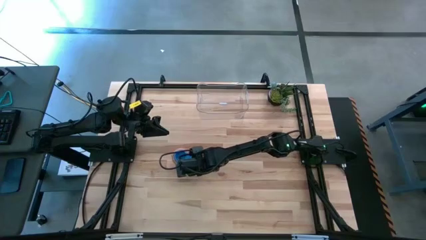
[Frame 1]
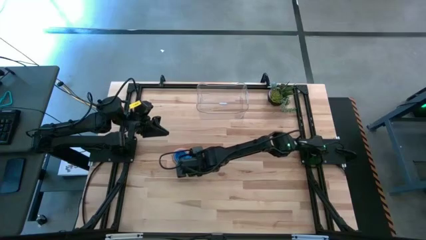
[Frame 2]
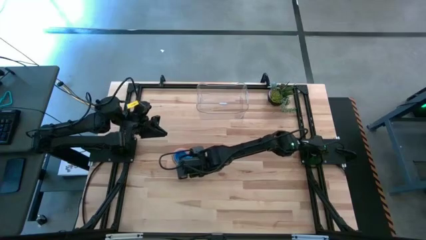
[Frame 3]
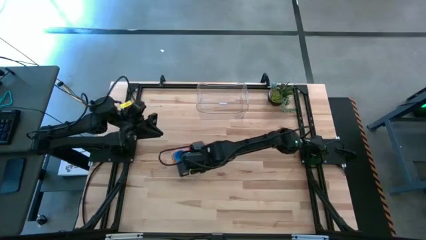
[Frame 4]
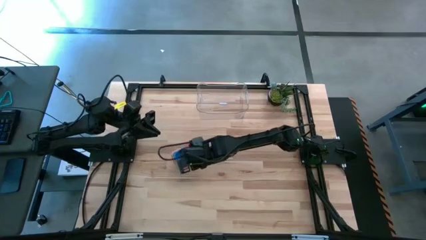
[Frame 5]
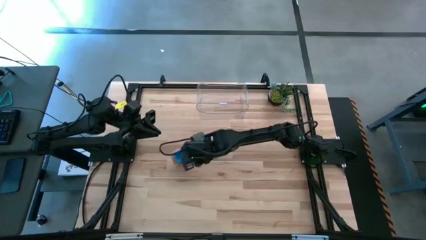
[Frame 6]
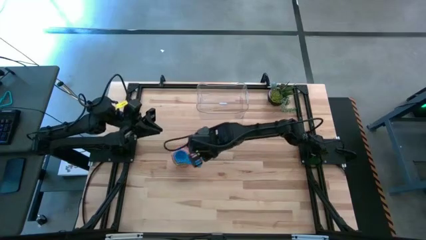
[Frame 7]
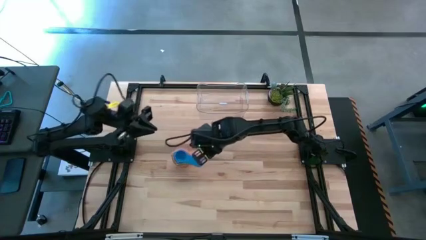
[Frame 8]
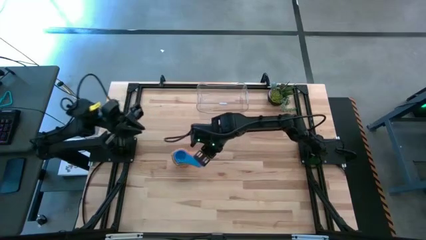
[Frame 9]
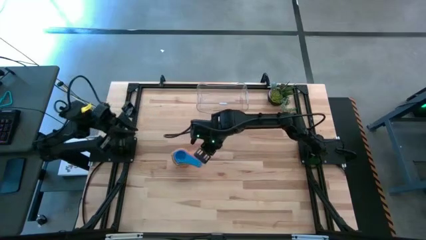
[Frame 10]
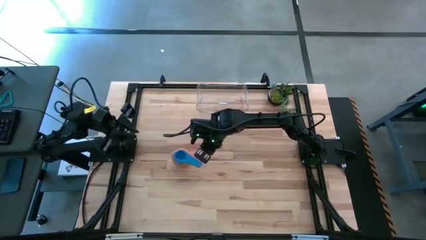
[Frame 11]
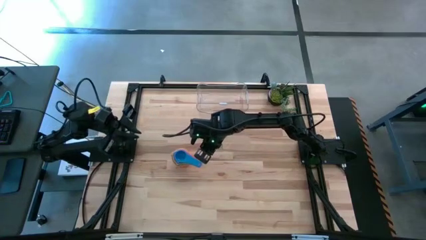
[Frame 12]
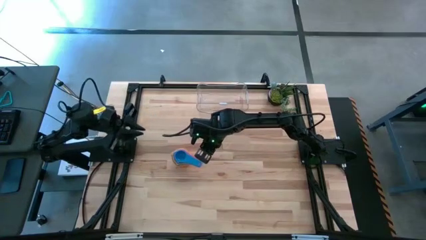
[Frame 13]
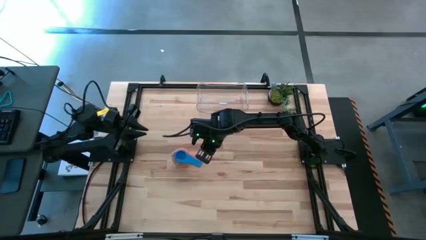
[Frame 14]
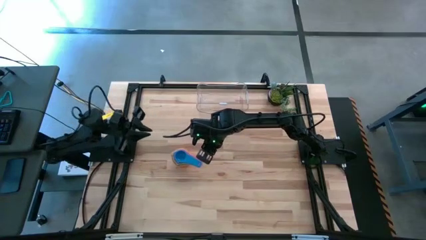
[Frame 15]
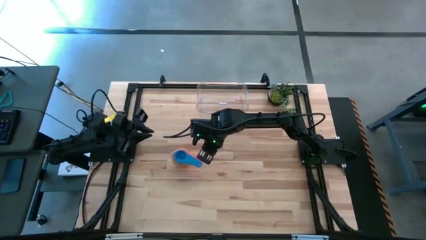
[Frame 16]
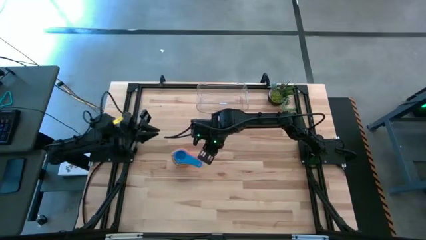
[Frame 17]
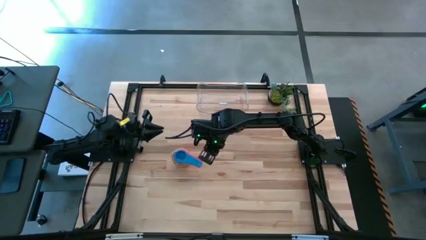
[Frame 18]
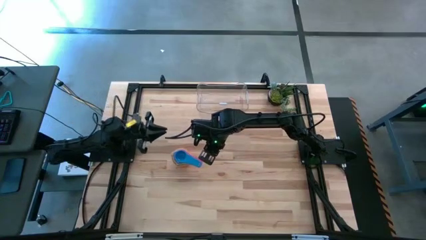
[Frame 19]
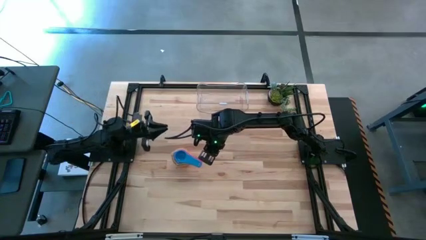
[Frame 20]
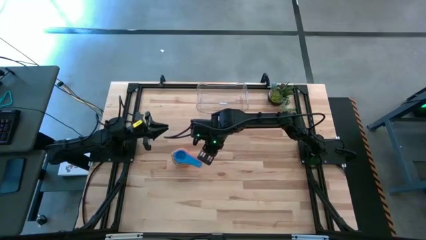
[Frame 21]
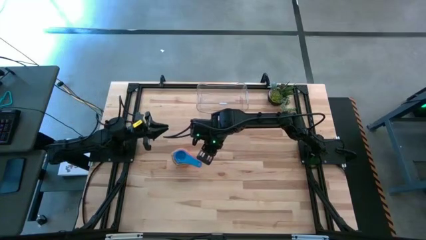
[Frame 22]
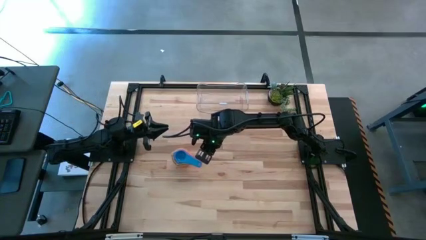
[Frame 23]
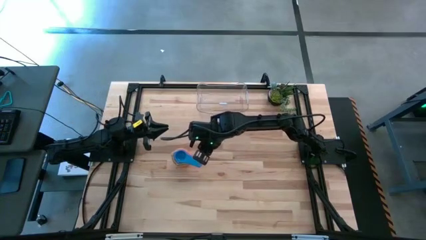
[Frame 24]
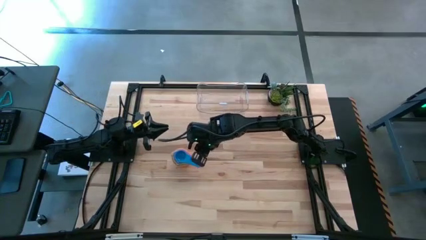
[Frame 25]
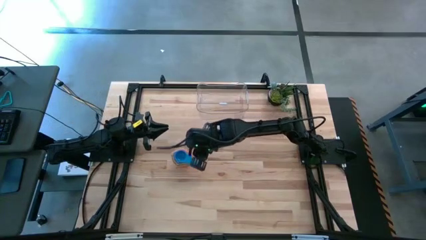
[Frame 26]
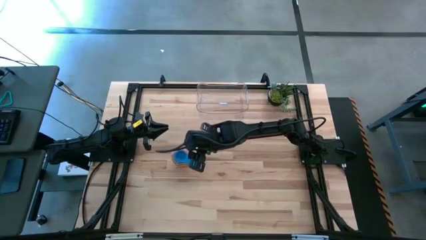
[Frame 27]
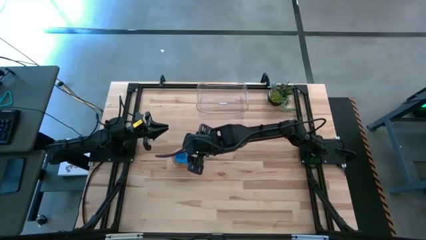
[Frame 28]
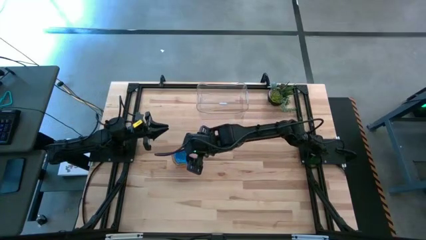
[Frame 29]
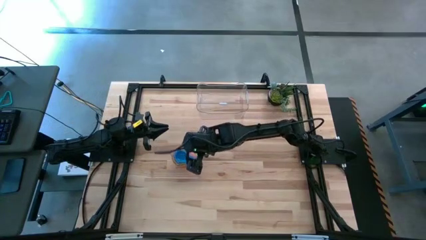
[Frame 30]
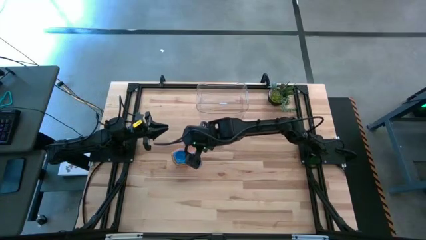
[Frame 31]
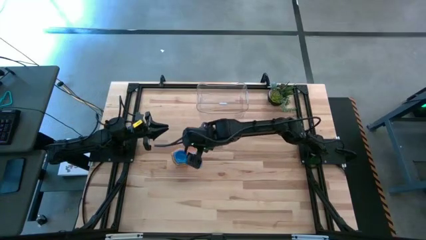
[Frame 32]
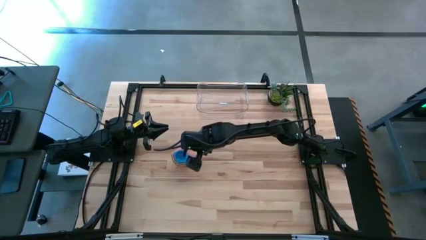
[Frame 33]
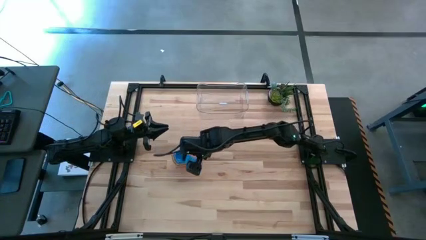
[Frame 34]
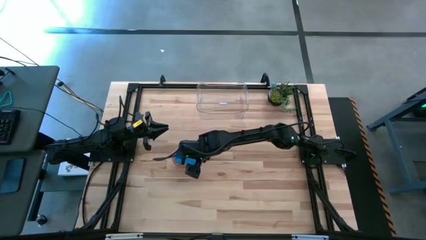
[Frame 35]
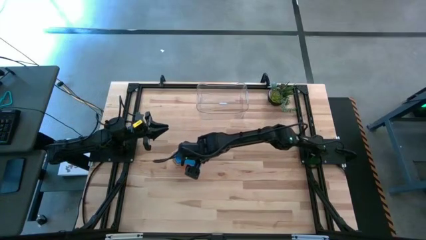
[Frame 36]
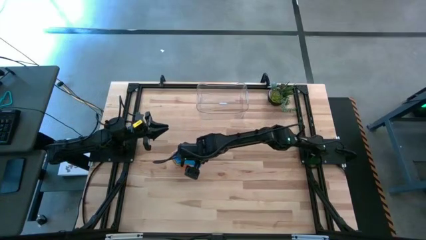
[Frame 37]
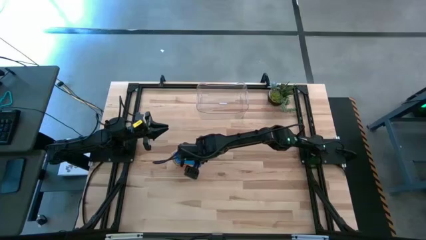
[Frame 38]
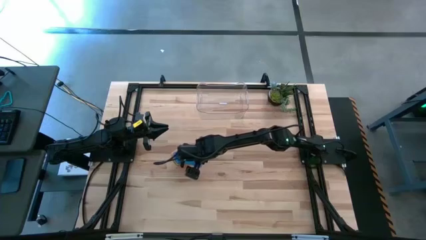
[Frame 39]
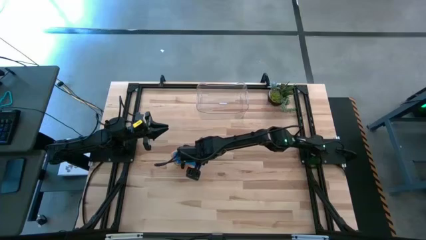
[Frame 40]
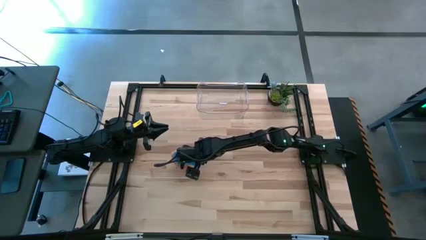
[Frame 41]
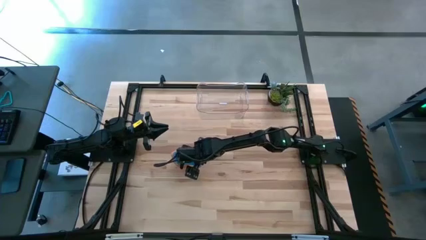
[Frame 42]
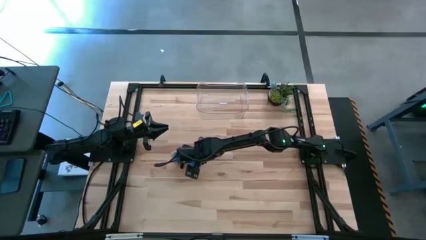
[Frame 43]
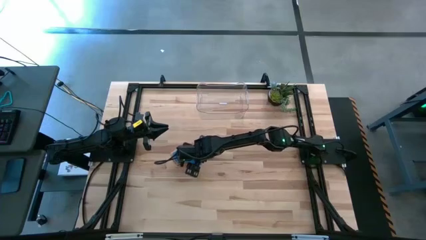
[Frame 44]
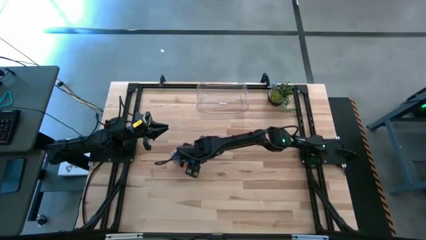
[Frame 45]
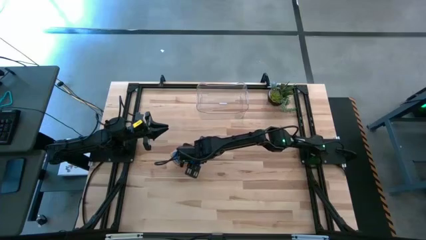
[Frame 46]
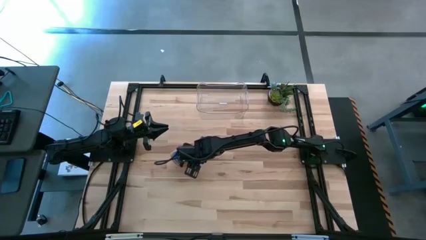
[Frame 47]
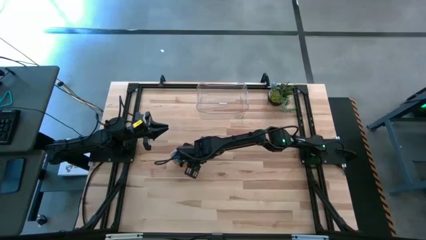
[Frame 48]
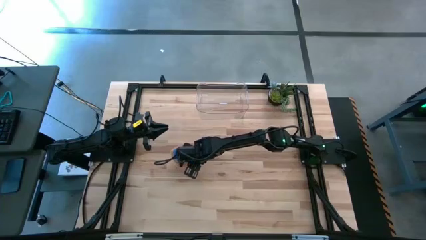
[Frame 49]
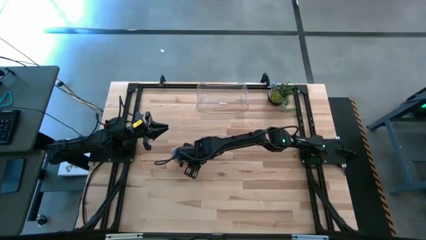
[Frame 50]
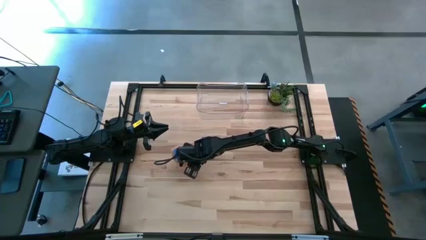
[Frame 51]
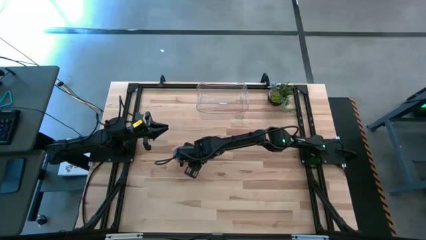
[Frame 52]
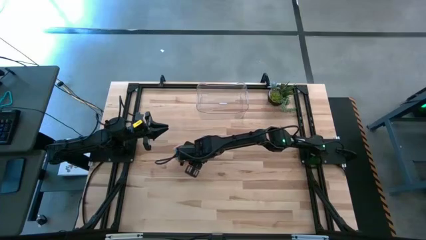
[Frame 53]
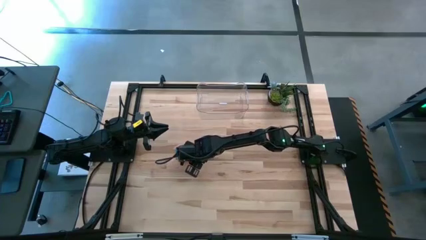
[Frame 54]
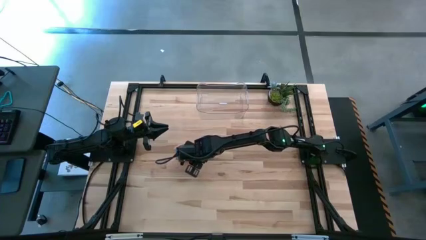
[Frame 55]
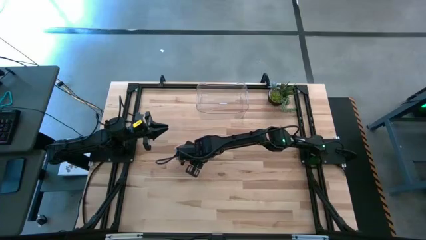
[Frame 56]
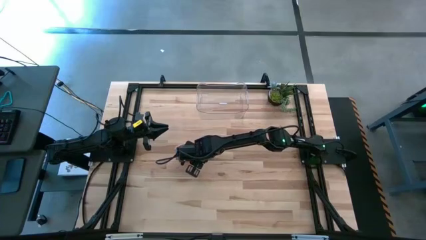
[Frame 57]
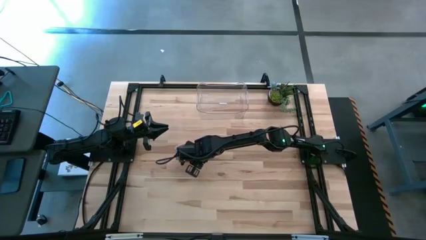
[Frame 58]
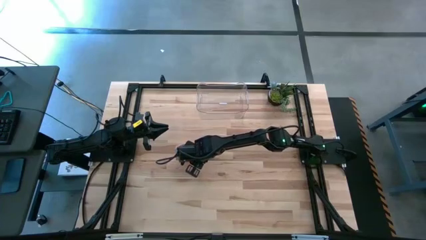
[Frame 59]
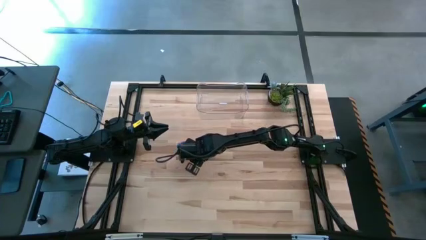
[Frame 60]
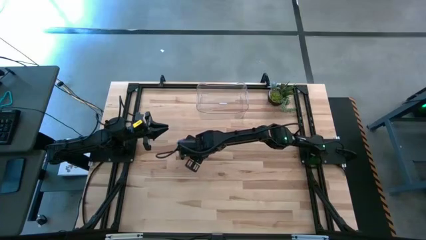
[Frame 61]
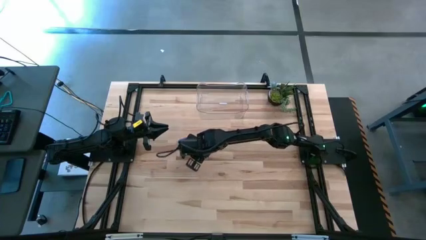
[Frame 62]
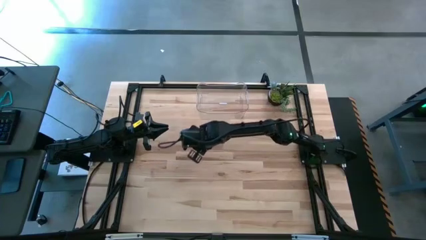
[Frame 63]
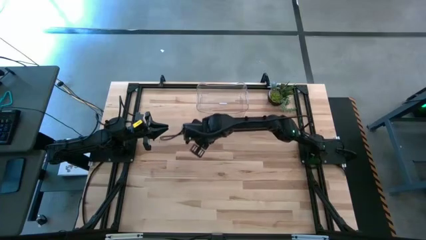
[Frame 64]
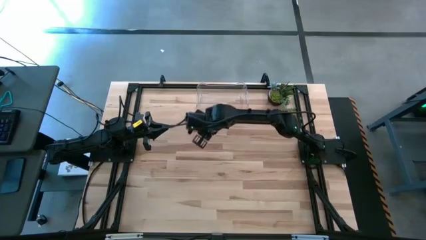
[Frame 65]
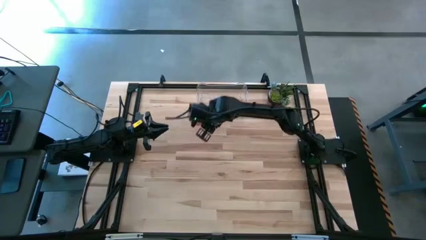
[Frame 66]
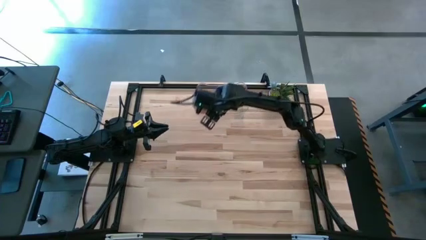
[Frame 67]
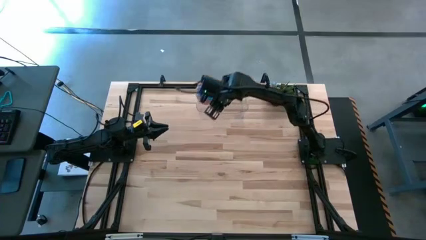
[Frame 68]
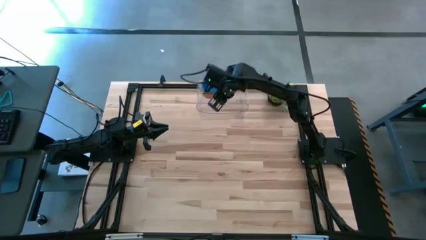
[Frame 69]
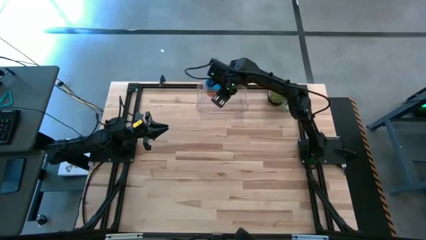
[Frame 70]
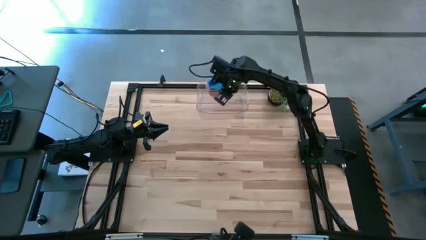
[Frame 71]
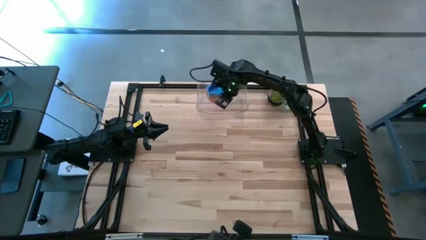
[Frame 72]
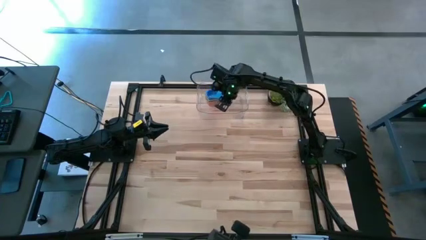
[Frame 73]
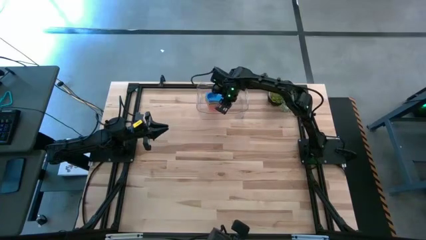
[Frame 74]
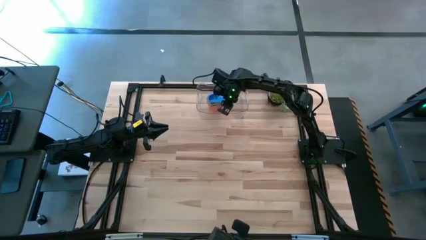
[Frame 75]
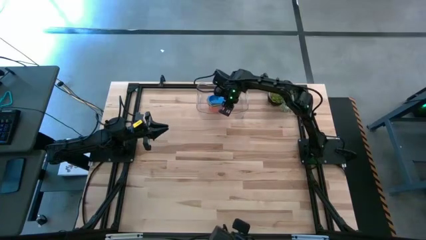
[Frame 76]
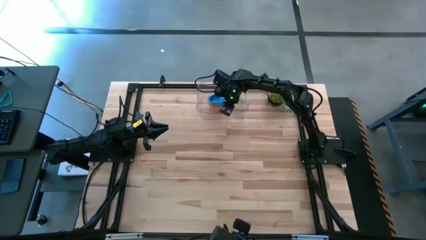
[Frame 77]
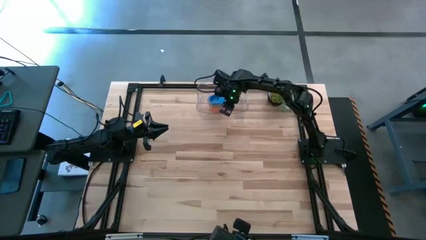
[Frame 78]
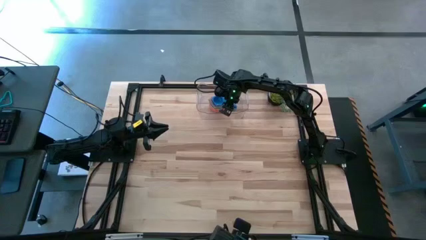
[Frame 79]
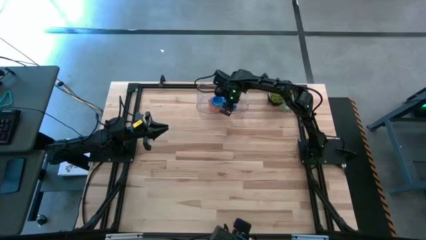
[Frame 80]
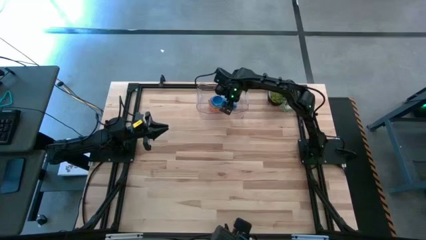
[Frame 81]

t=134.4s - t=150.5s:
Task: Nest measuring cups in basket
Put the nested measuring cups into the transparent bin
